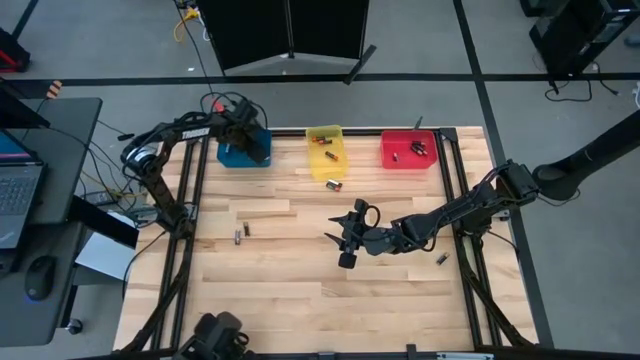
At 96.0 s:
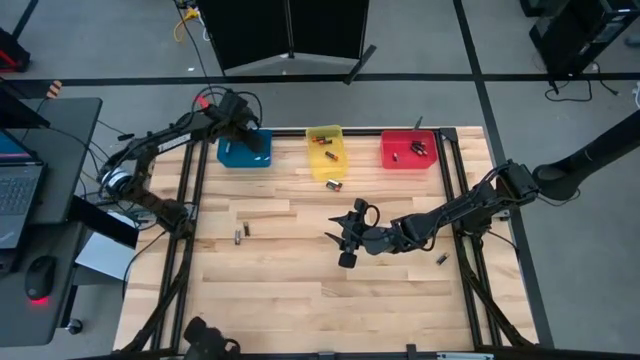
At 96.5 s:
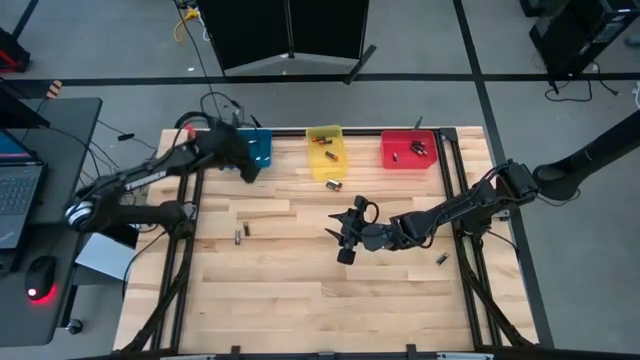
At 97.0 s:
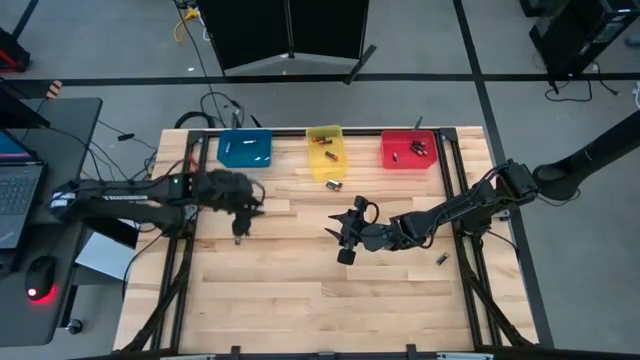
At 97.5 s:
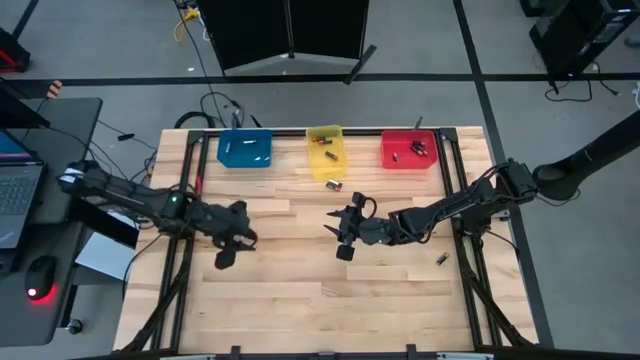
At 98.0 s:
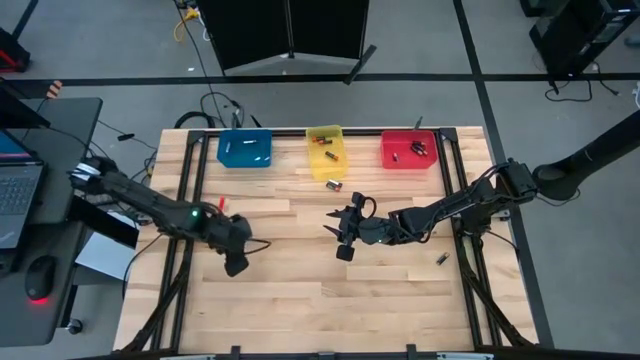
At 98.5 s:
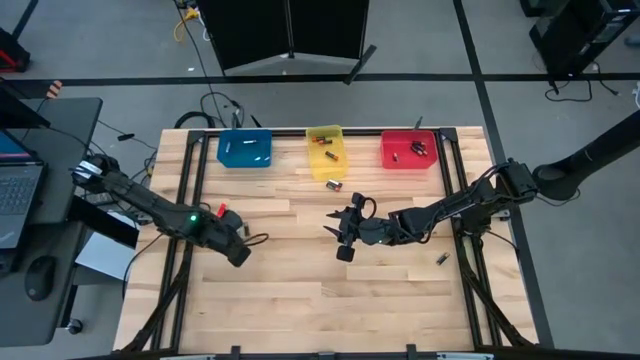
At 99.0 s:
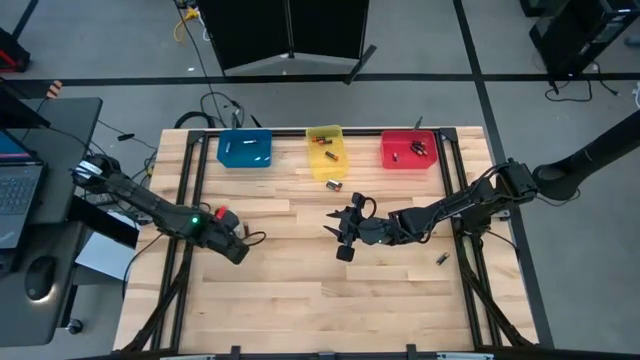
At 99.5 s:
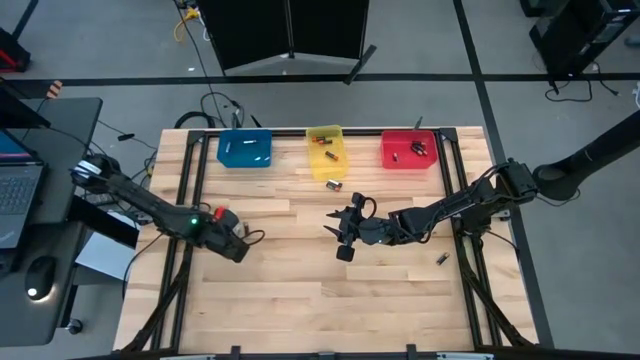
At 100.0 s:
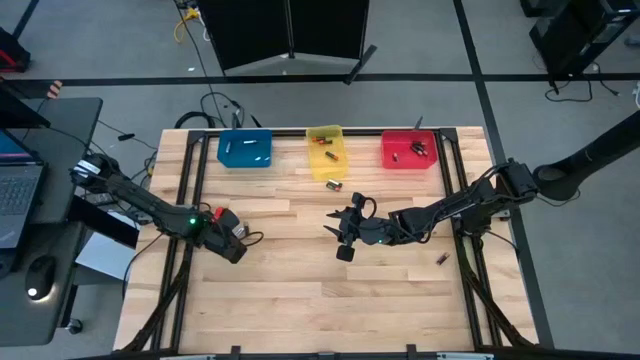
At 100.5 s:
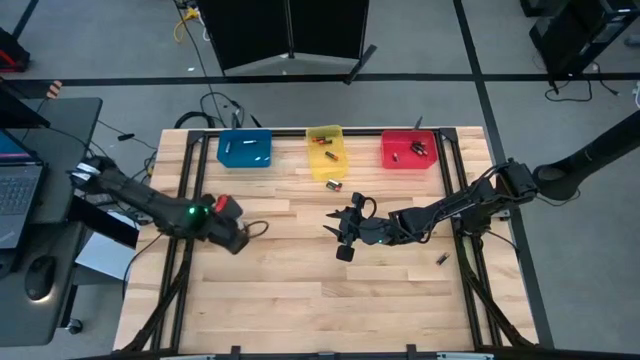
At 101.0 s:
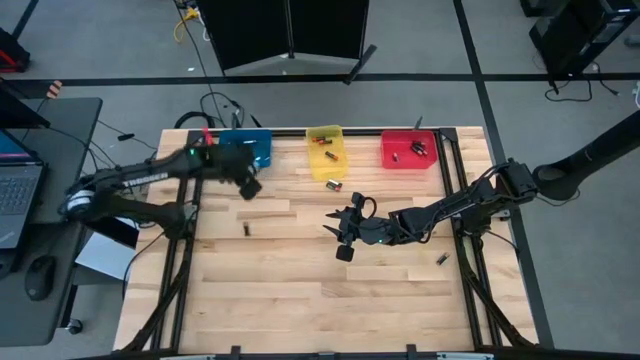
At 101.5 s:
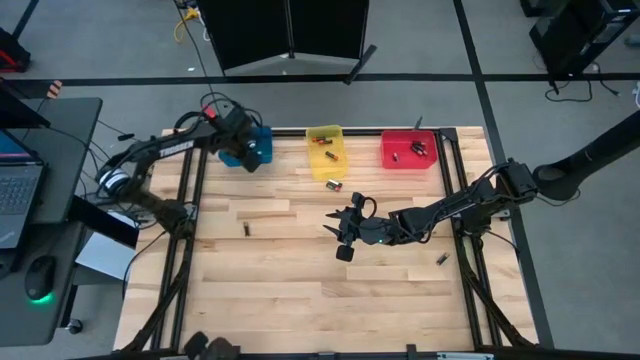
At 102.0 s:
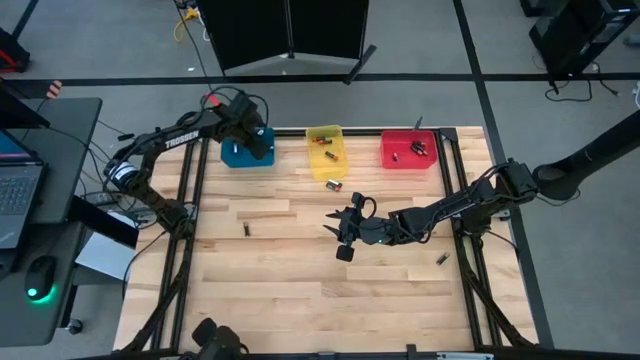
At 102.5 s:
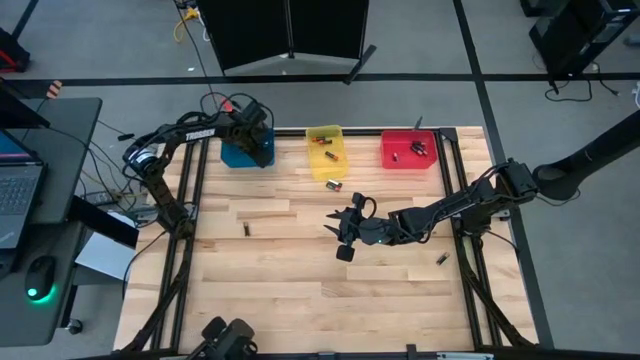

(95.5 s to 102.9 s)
Task: Sort batteries
Put the bottom silver battery into the blue bin

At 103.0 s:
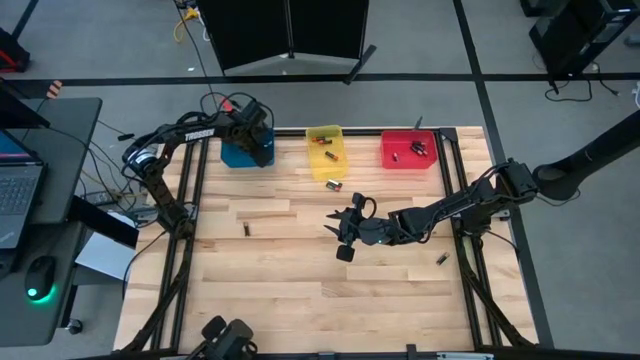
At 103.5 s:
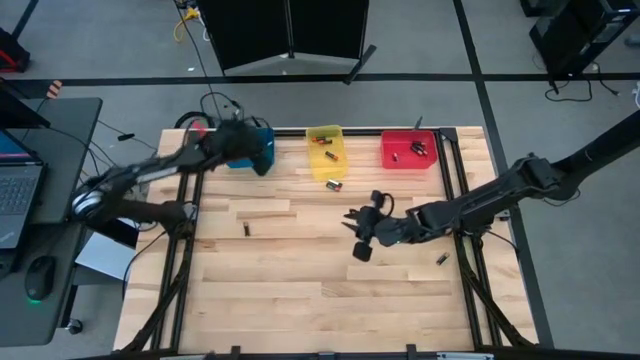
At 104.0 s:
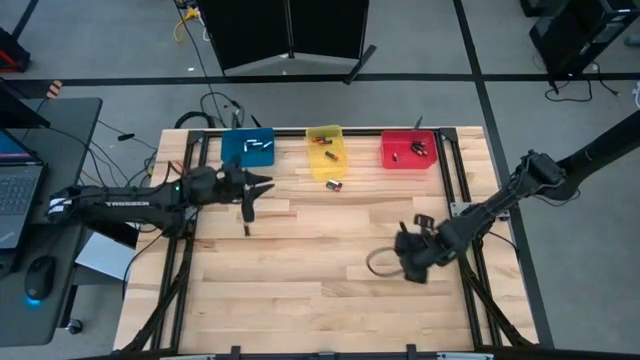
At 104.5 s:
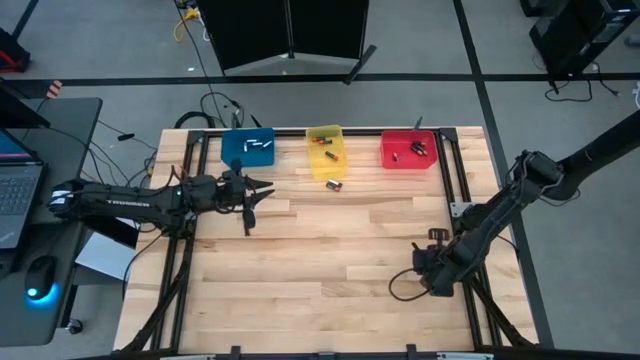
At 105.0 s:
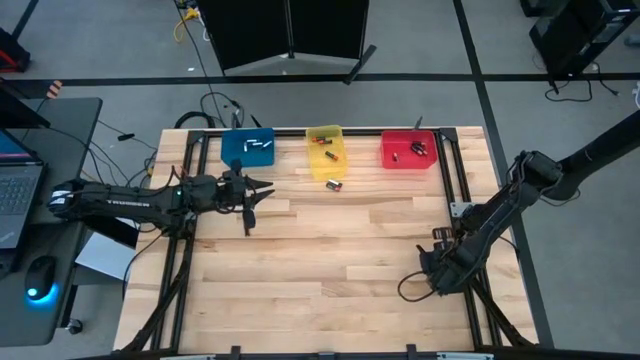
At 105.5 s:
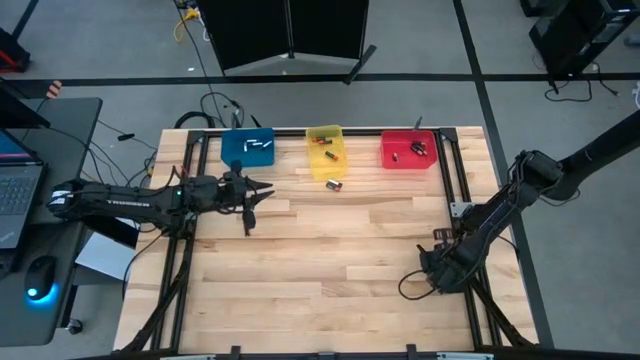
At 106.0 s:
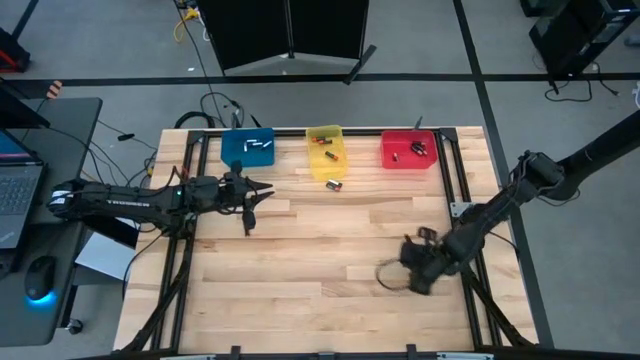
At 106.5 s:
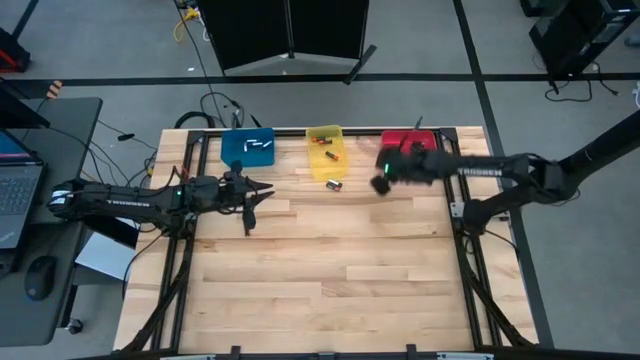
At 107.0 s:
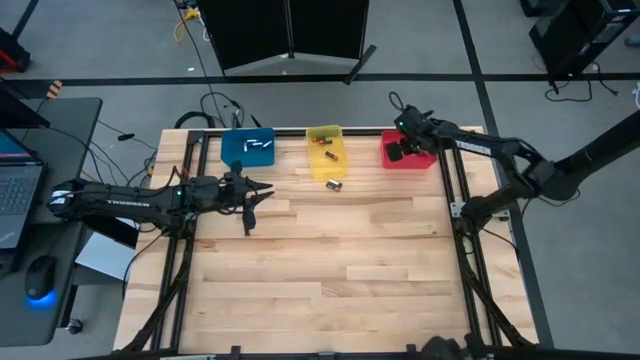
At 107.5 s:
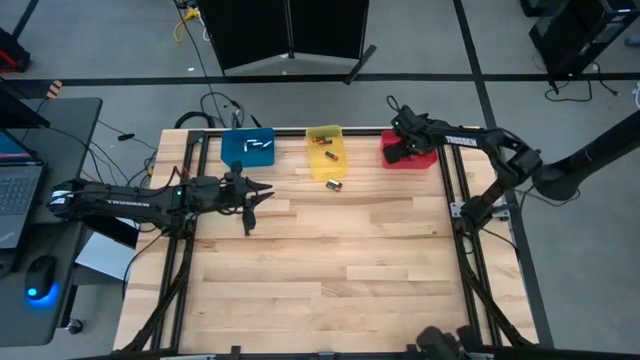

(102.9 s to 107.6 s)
Put the bottom right black brown battery into the red bin

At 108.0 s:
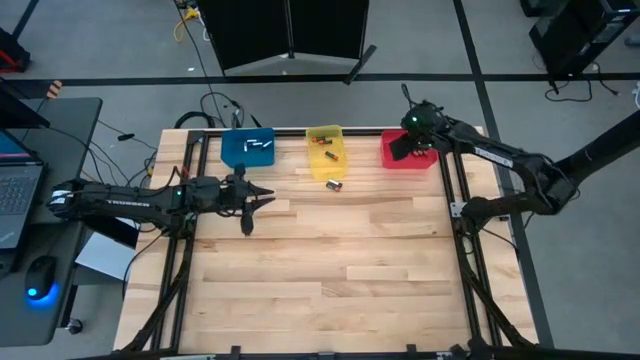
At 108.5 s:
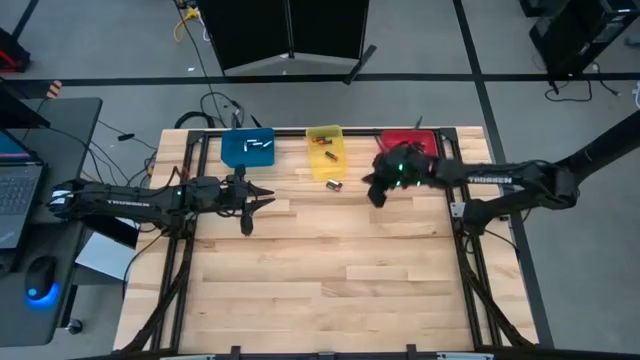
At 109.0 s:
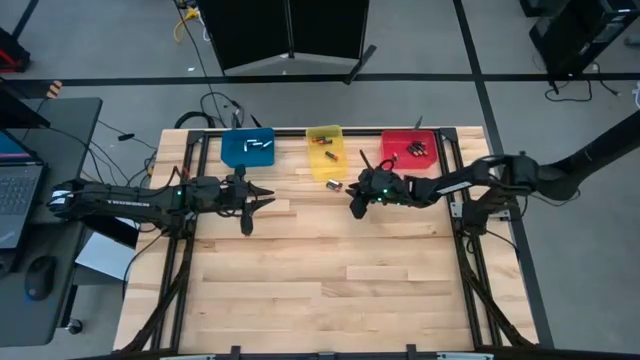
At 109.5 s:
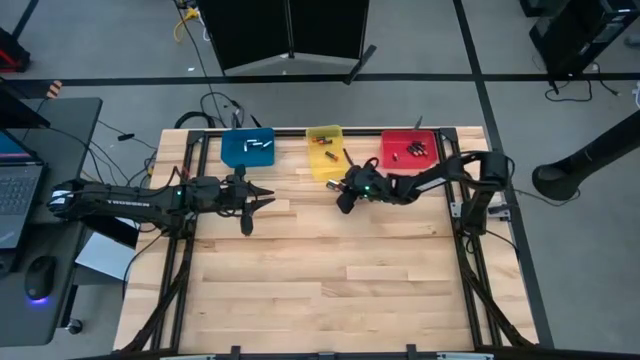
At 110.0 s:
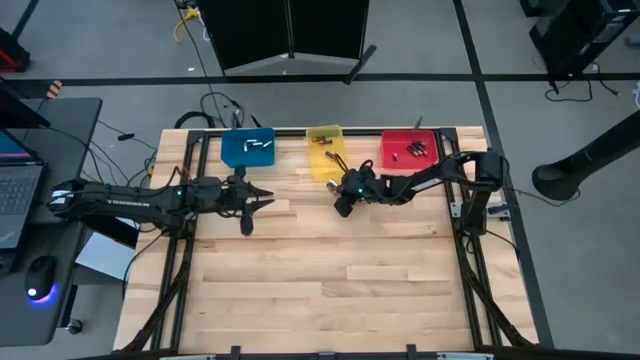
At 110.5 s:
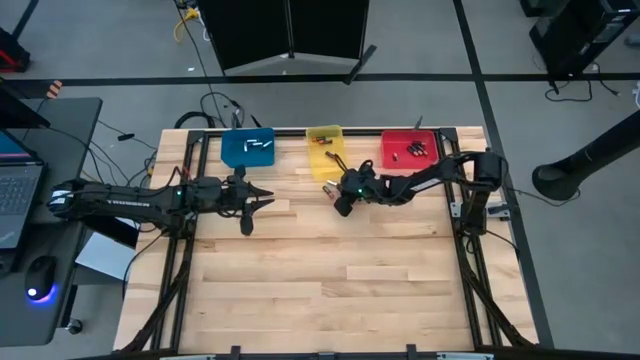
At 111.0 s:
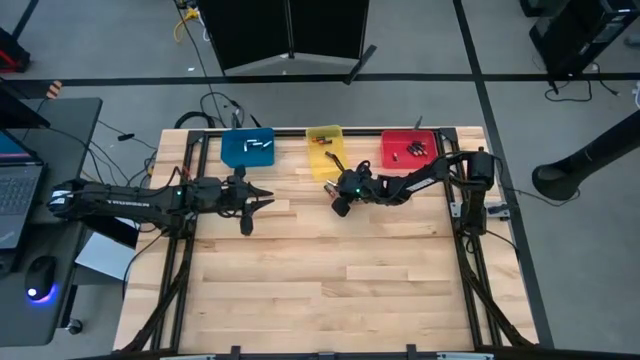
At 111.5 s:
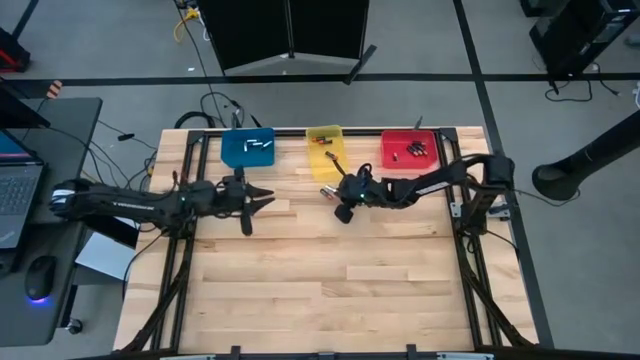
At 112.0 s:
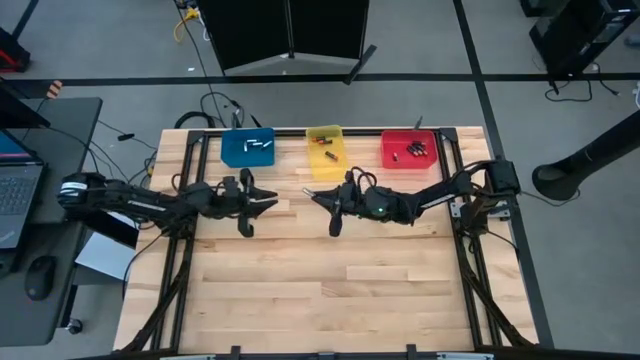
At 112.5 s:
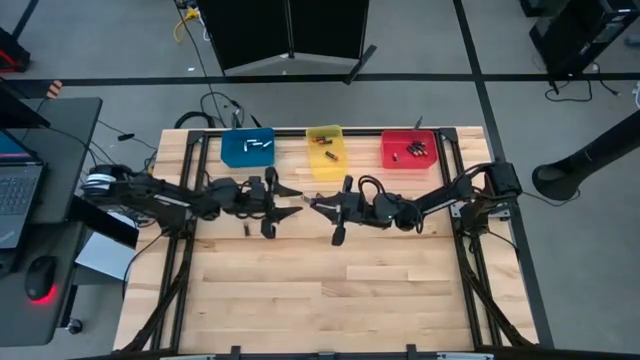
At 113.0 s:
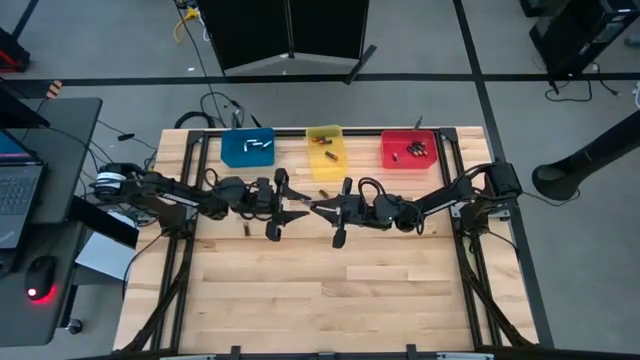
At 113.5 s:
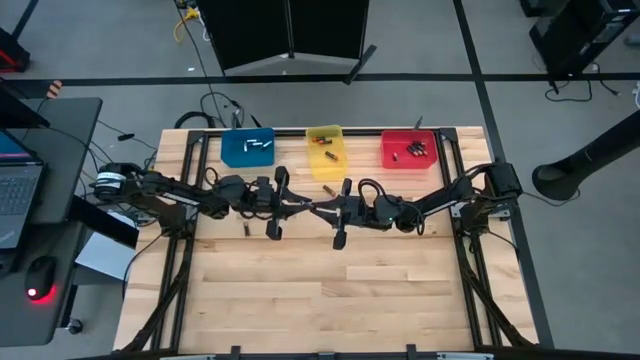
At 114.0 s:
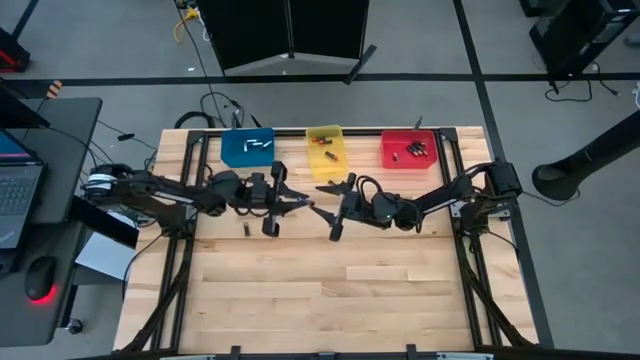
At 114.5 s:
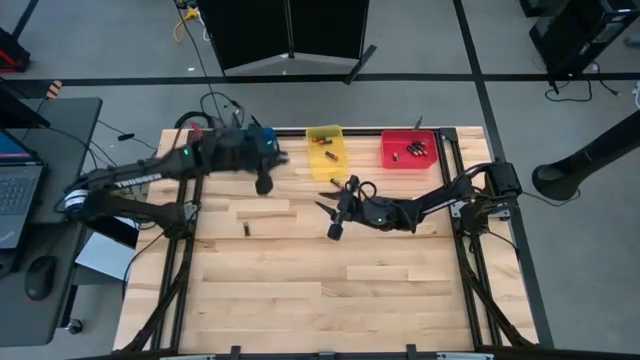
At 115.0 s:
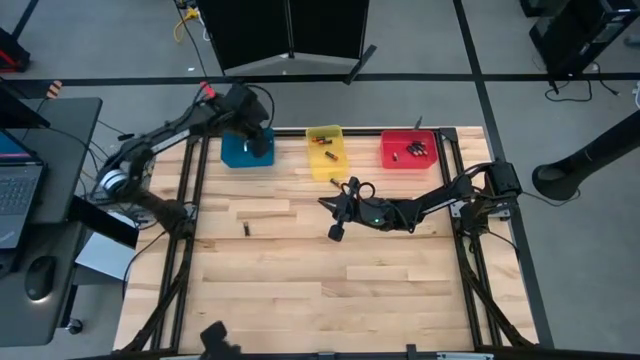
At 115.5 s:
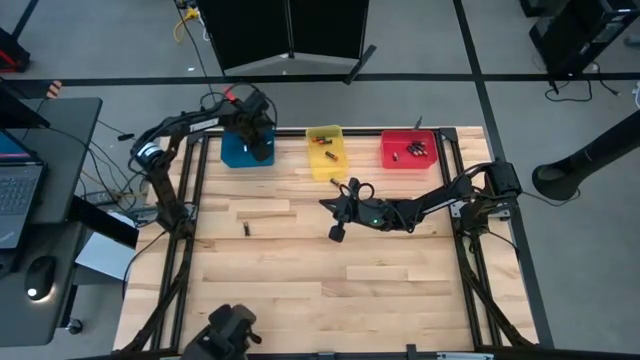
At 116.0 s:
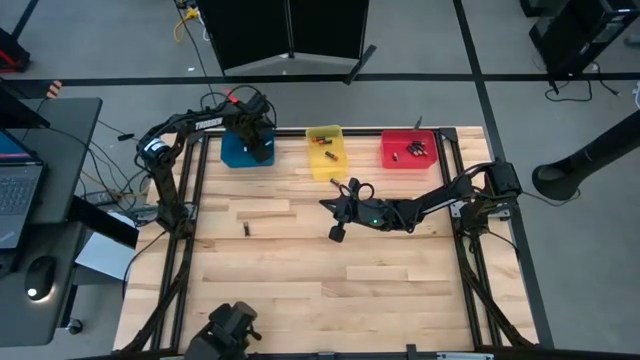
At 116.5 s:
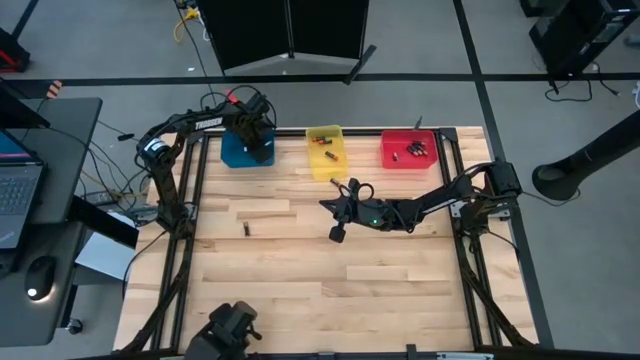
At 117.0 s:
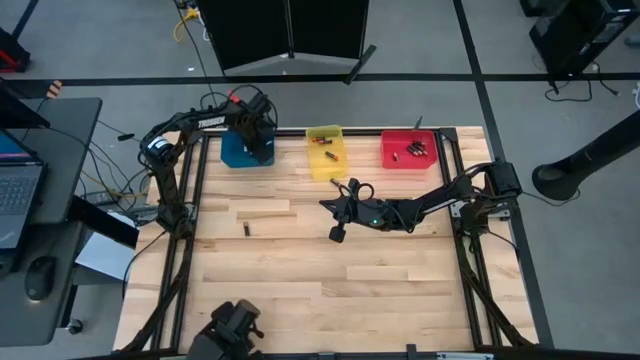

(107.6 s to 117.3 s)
Put the silver battery into the blue bin
